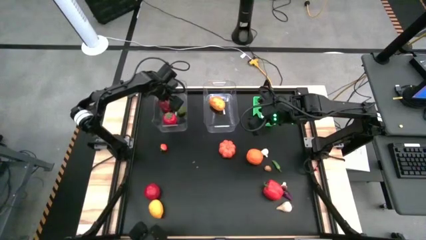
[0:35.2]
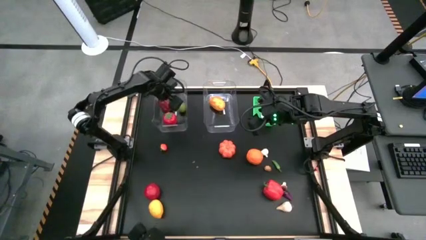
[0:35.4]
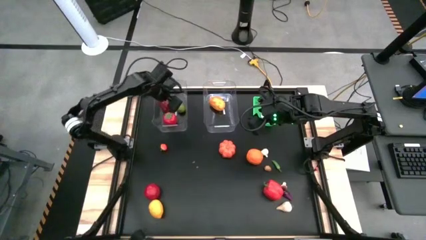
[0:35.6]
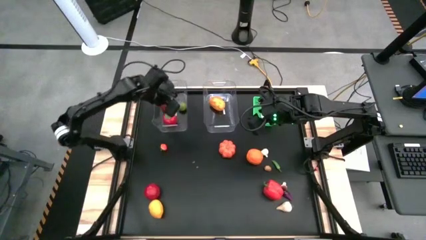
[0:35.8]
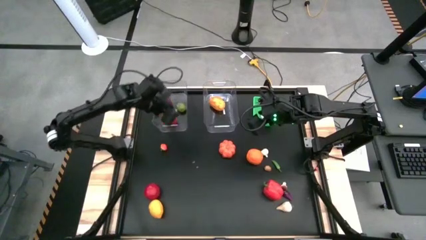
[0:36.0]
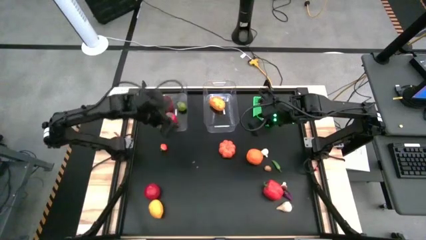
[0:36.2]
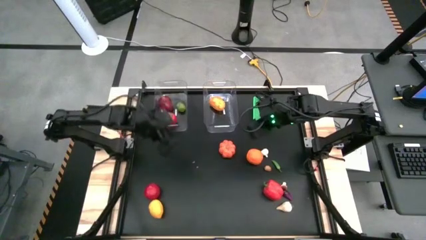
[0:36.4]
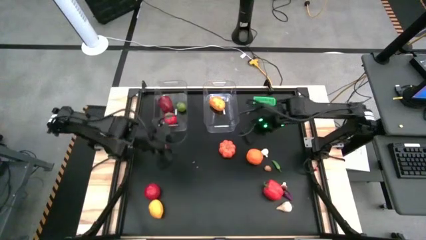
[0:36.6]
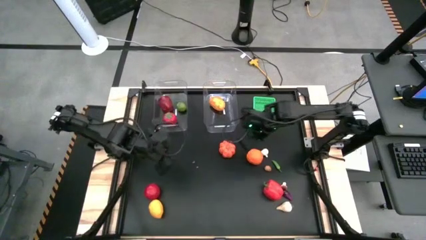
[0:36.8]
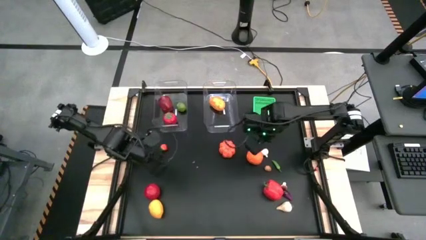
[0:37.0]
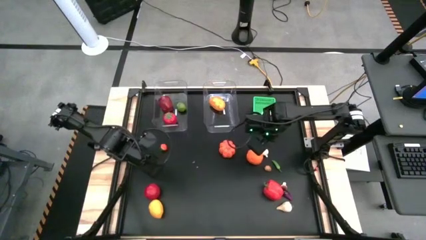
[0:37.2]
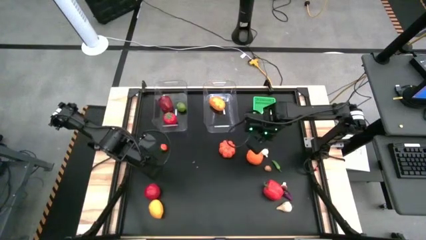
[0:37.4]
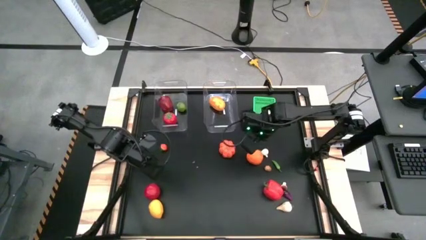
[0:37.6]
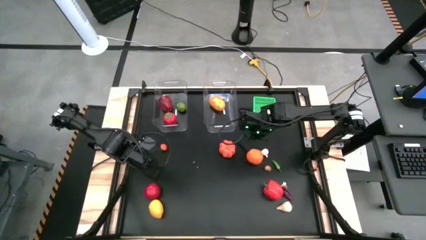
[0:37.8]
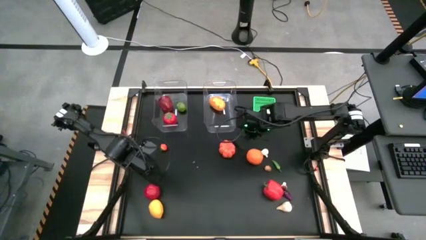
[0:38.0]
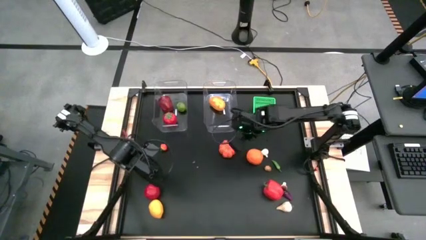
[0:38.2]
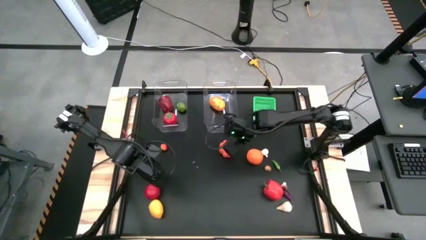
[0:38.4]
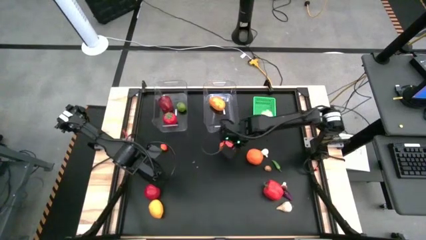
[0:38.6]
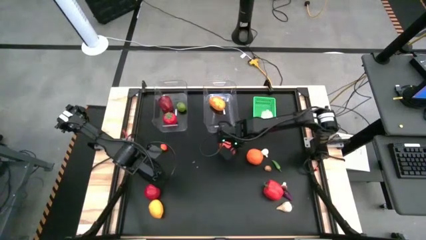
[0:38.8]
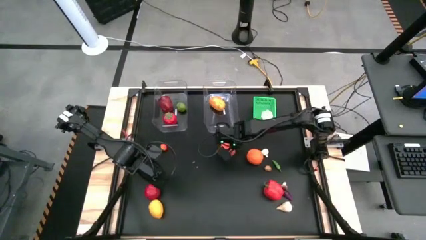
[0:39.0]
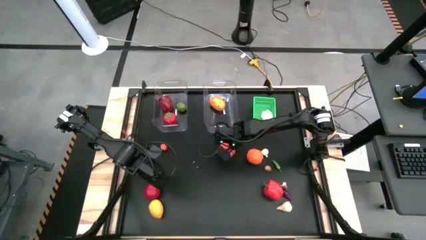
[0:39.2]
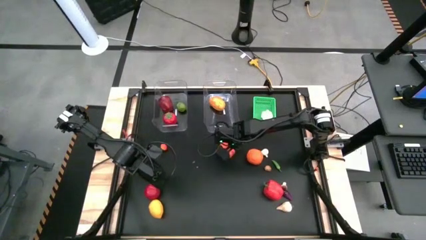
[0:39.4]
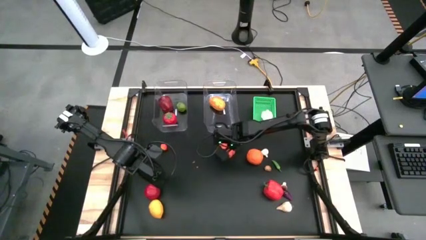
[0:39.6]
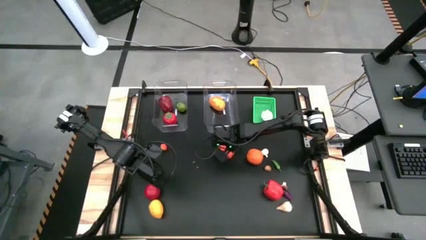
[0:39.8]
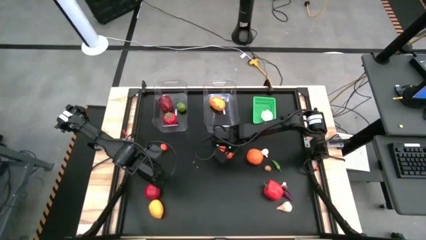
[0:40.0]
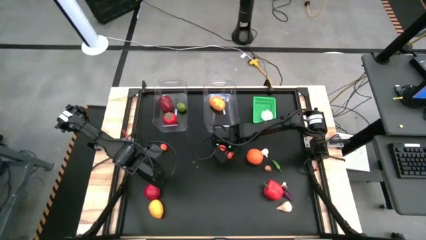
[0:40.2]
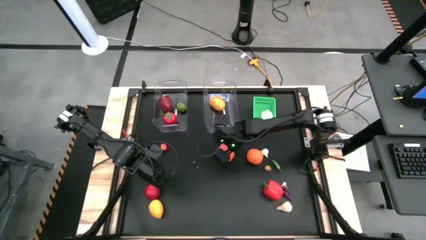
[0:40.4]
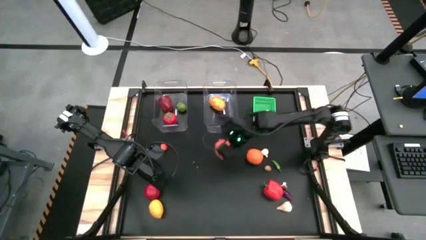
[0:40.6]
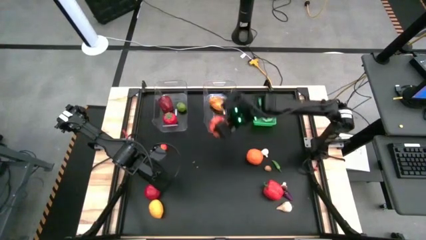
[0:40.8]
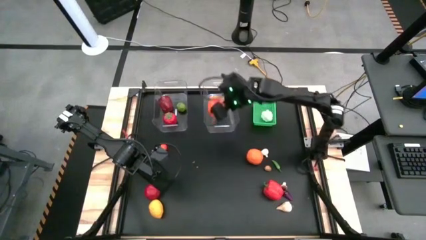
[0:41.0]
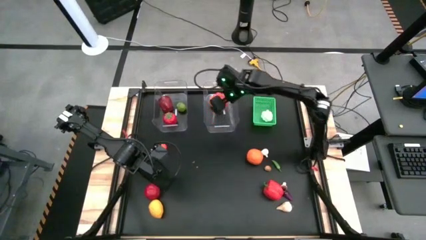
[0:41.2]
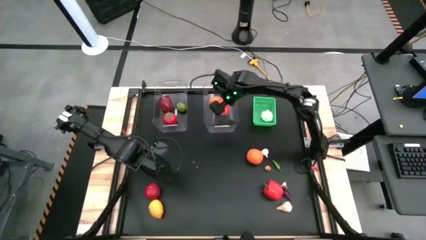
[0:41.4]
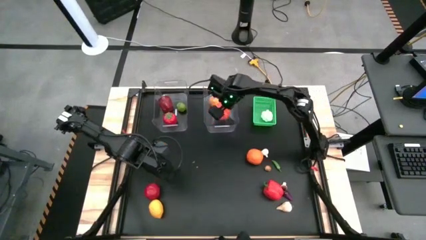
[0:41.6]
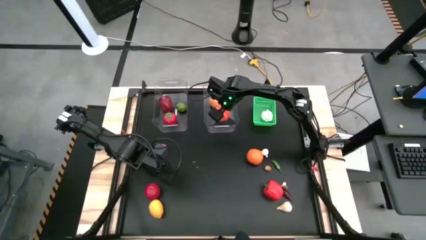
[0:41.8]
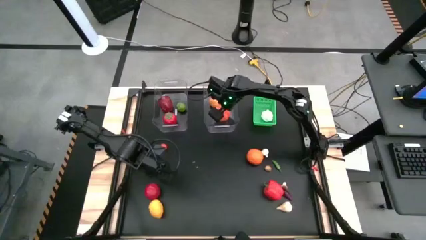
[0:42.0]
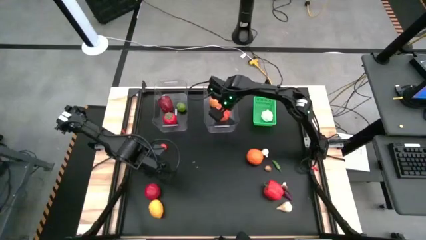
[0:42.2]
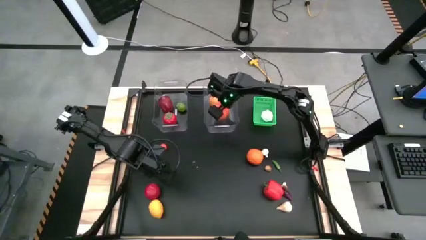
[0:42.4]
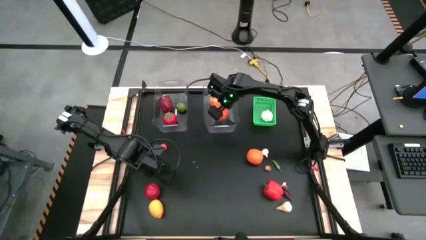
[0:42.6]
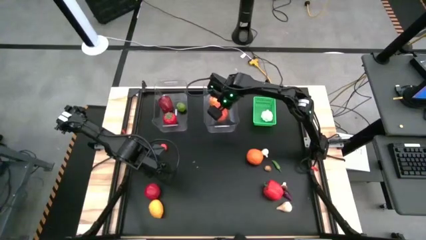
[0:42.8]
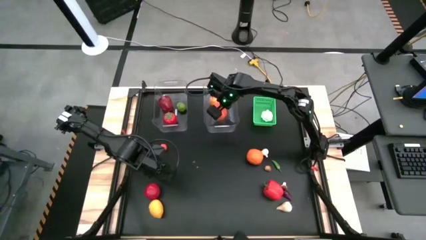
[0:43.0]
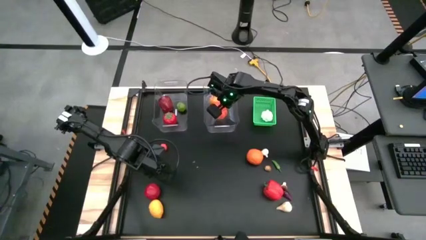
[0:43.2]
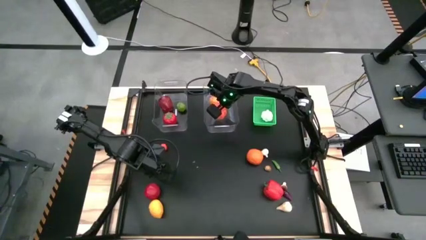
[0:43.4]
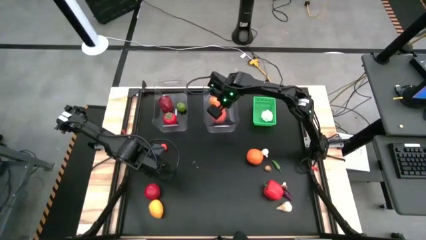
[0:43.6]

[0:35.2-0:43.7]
Task: Sort produce into baskets
Put the pumpkin into the right transparent bin

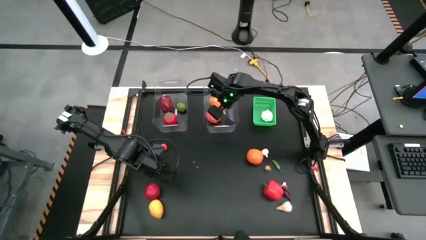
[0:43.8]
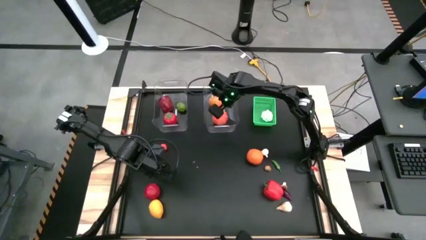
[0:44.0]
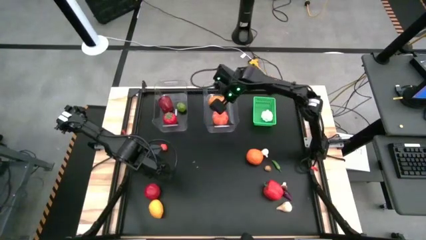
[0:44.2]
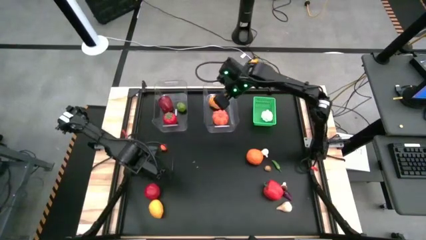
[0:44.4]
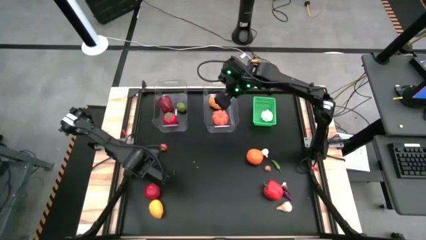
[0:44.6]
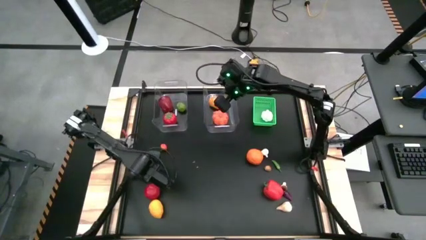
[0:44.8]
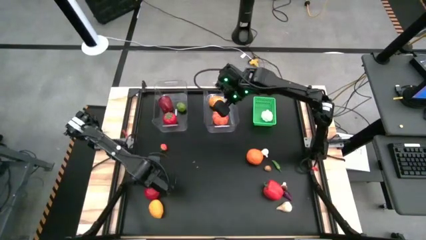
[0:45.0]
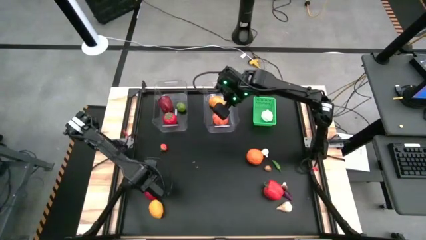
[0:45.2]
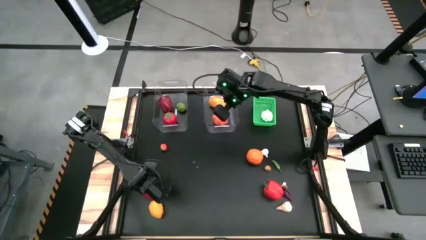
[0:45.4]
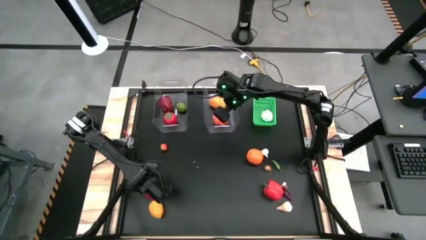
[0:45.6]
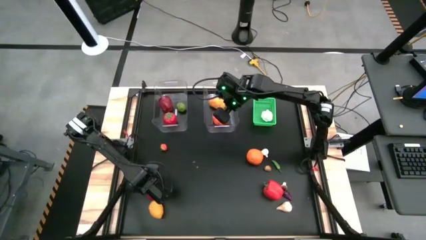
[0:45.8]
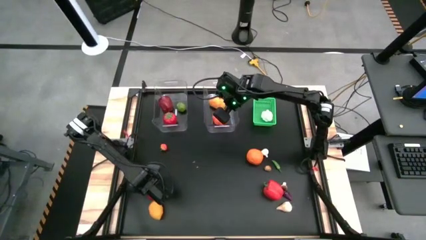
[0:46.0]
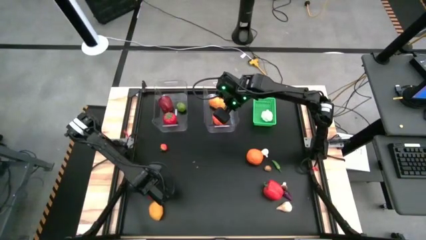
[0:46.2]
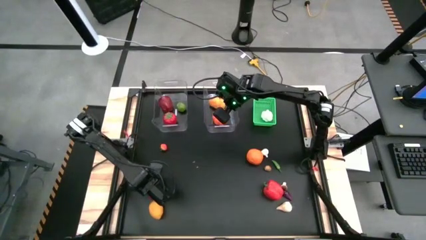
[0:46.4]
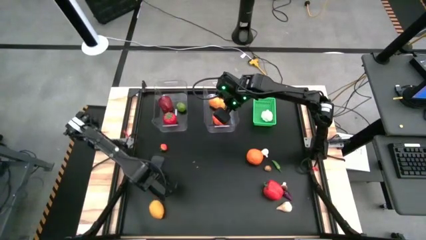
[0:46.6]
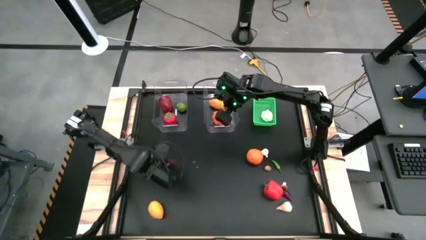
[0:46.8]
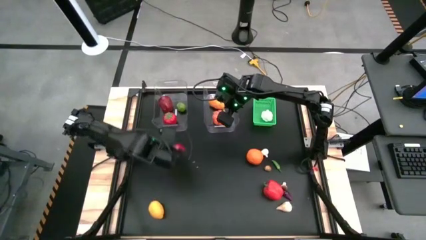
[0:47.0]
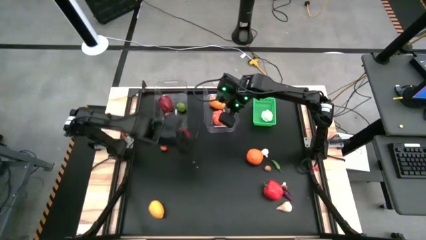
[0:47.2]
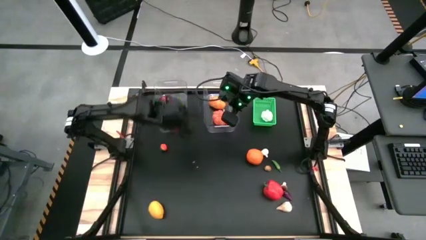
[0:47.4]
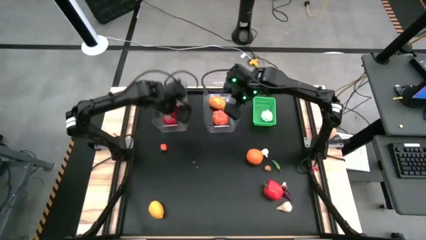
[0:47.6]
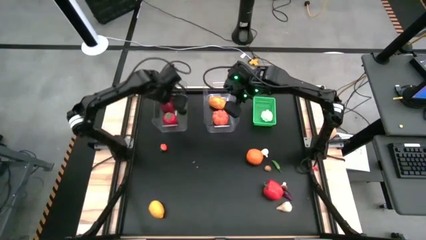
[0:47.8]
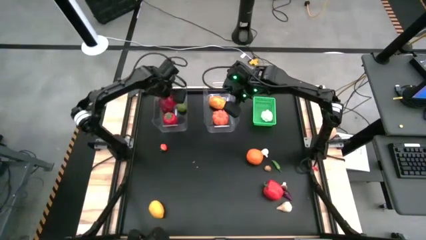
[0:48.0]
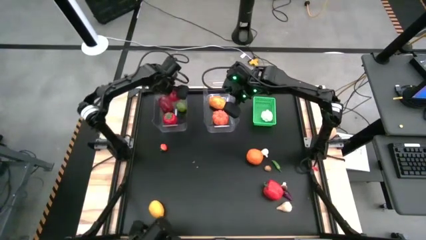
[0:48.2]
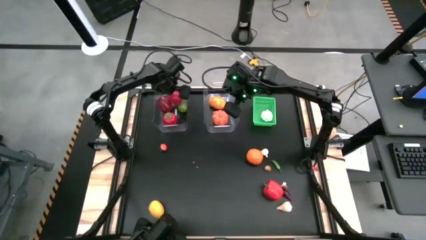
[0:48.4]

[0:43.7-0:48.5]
Put the bottom tomato into the left transparent bin

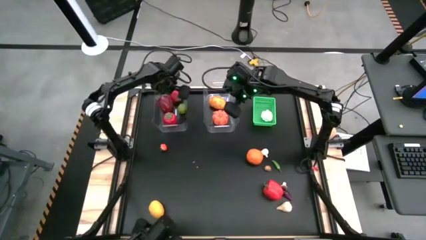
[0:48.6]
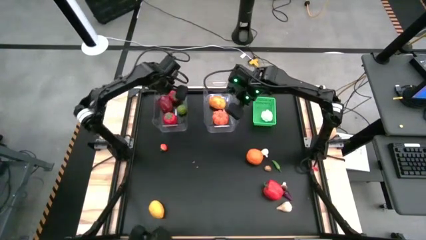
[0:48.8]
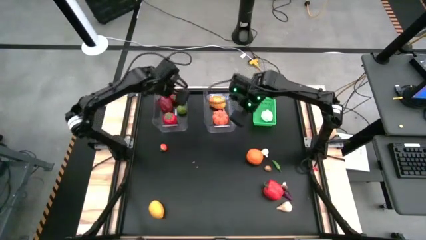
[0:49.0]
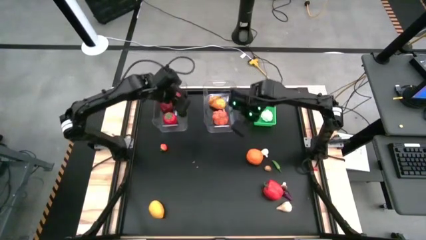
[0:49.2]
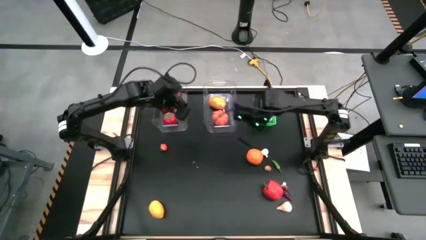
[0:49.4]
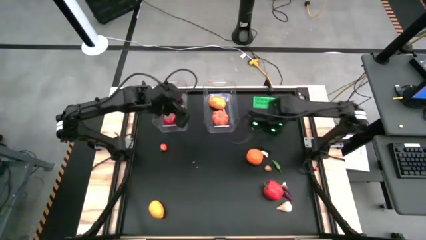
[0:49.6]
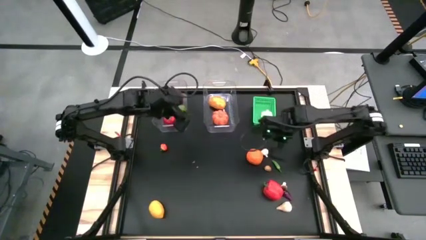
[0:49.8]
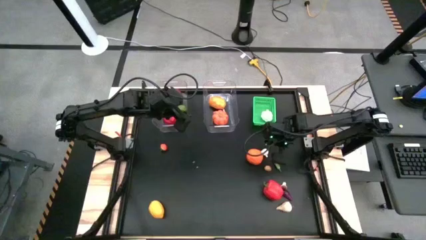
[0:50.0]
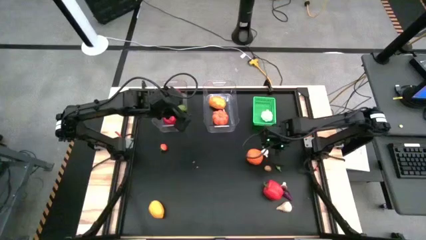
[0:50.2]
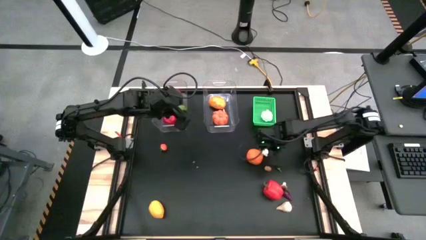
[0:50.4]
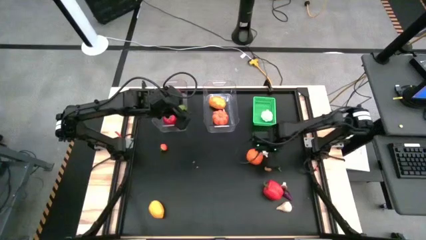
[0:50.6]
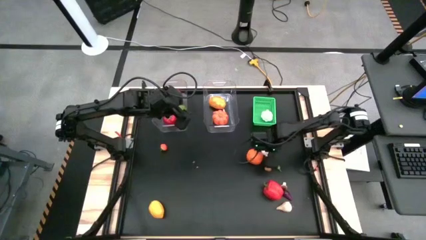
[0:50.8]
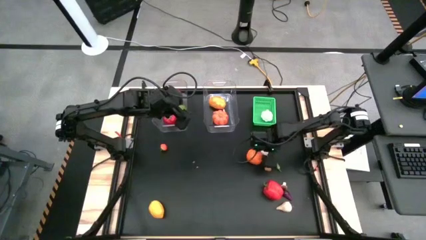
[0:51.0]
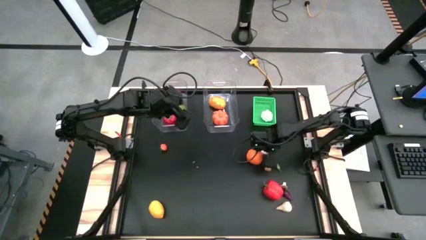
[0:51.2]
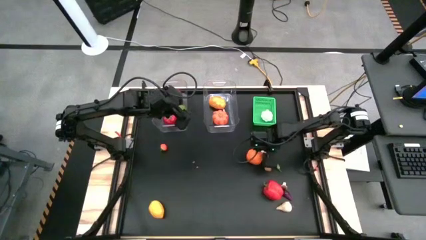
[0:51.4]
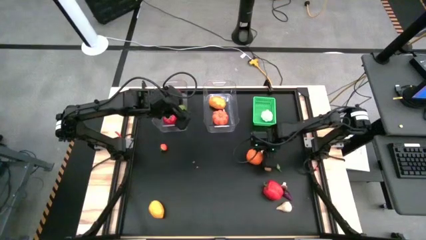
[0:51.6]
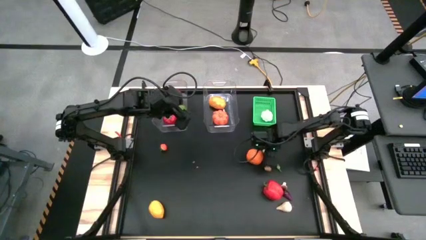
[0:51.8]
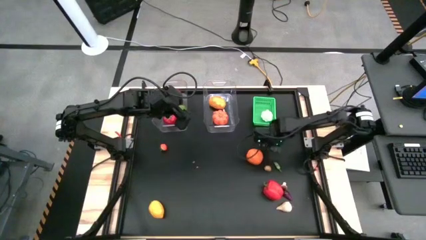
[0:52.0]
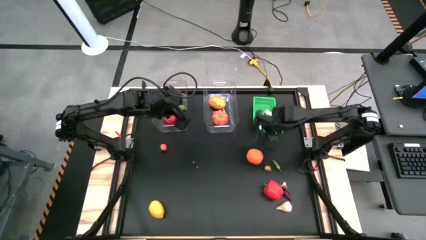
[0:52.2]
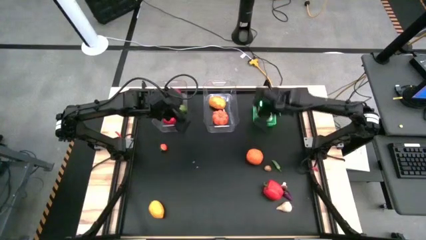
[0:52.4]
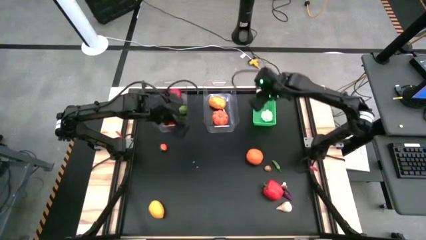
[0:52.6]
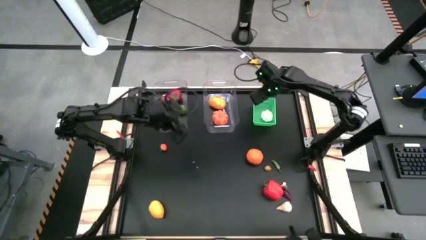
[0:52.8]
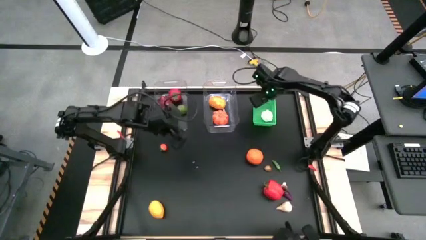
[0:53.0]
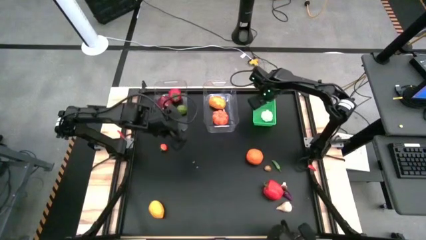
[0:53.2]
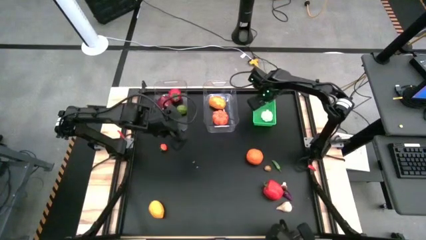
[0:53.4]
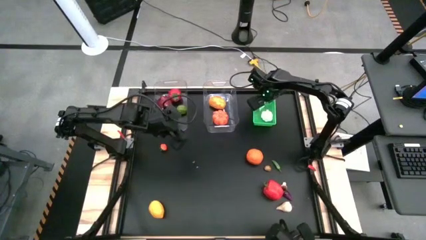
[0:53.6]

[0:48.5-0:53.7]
Put the top garlic into the green bin
